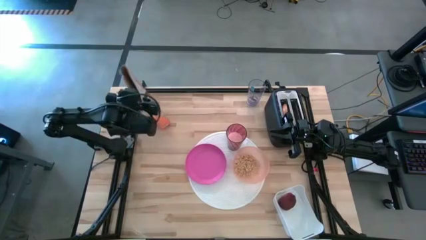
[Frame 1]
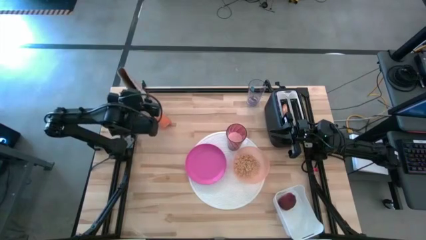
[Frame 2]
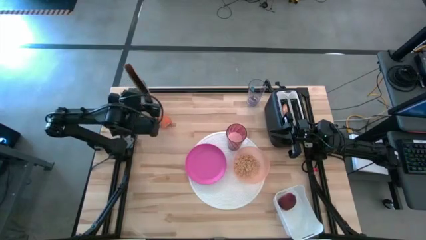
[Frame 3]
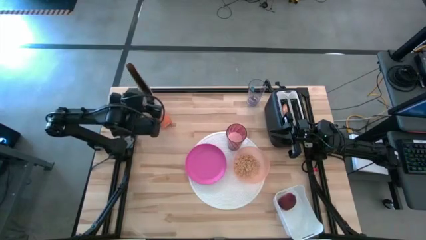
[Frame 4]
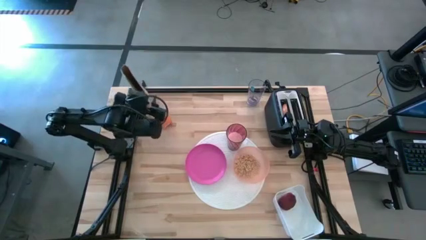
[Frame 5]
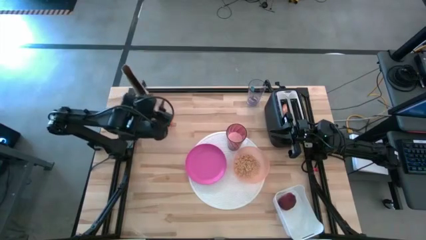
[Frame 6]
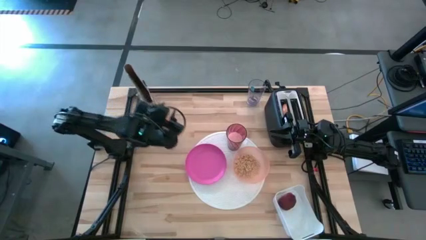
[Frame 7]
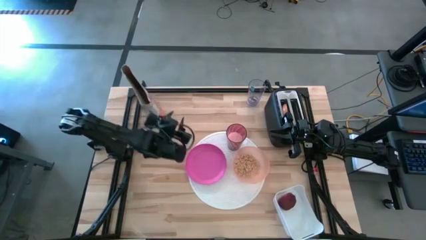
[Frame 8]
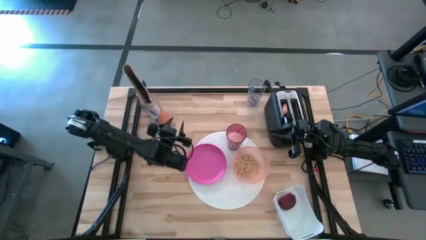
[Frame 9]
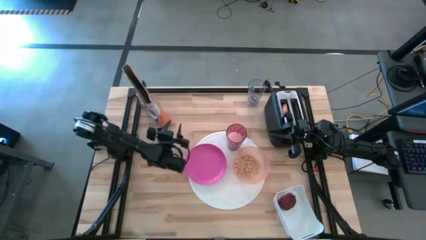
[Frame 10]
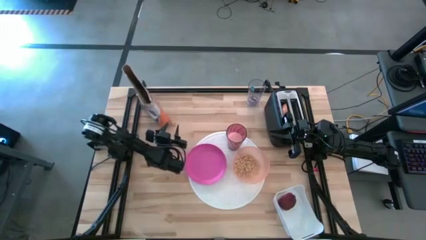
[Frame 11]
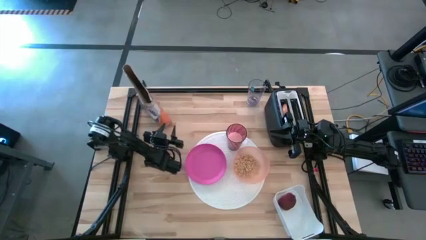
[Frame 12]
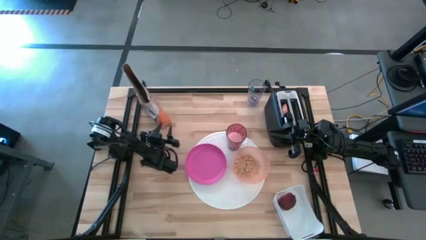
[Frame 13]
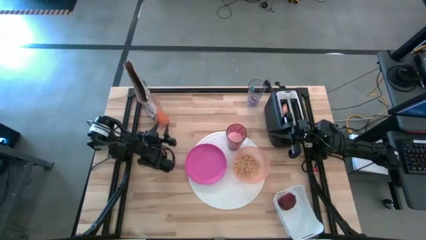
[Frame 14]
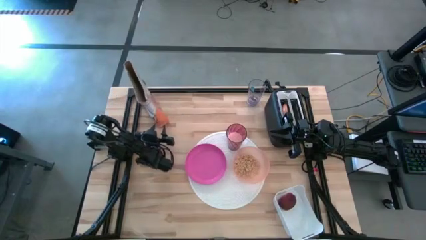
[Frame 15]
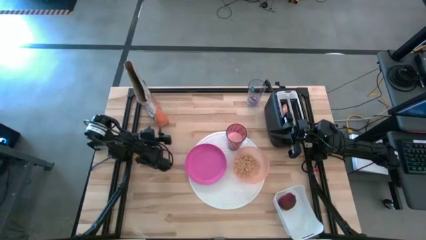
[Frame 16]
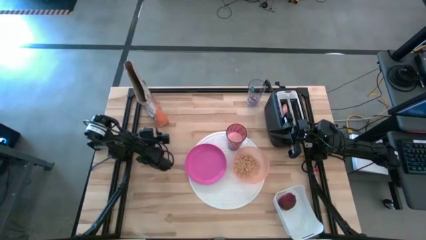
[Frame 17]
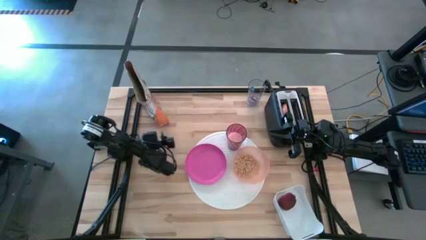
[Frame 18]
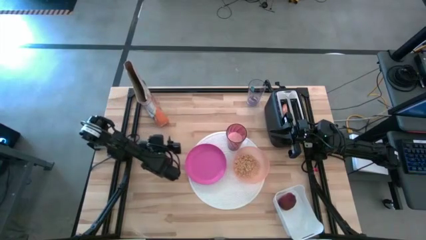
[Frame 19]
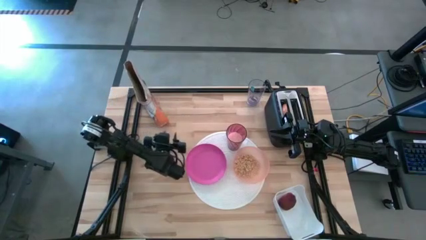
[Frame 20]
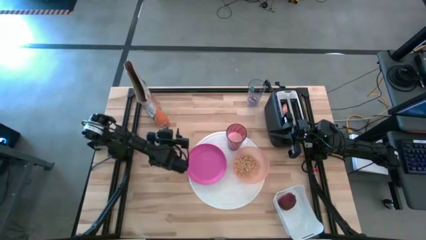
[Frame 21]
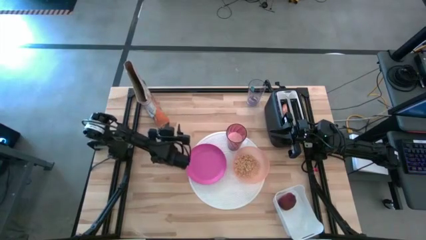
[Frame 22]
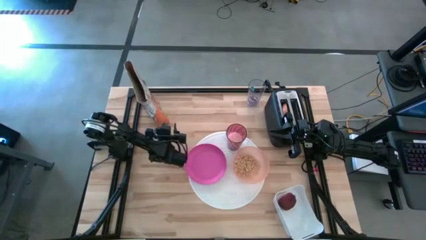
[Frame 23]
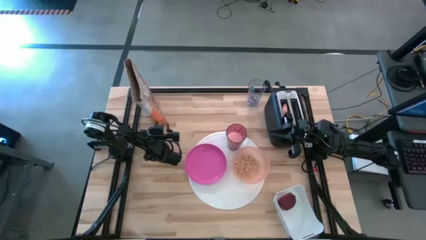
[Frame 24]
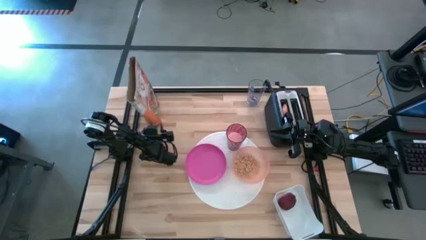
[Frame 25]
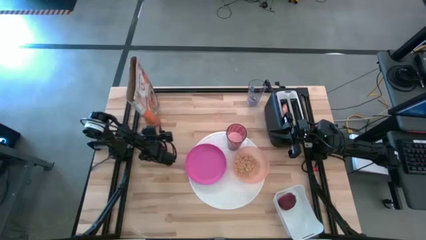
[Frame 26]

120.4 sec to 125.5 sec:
Task: Arrange a breakfast setting
Adjust the cereal box

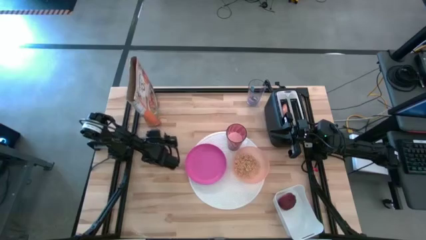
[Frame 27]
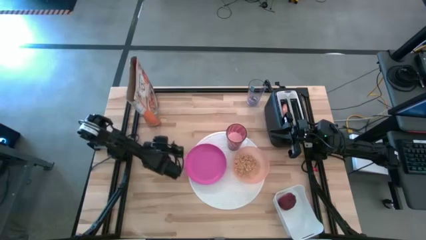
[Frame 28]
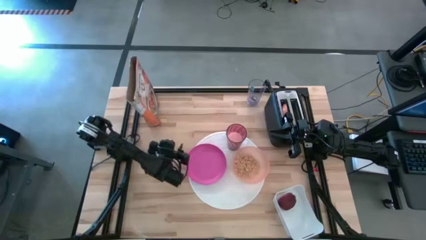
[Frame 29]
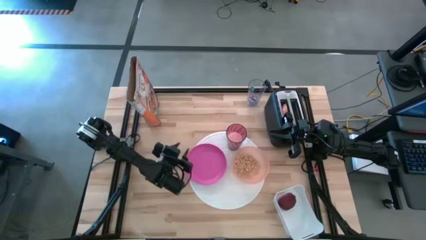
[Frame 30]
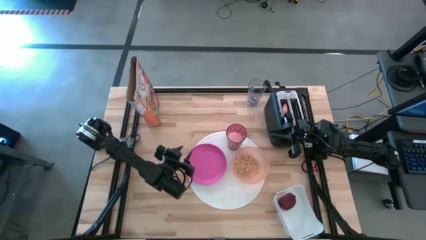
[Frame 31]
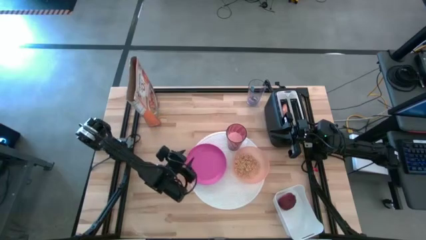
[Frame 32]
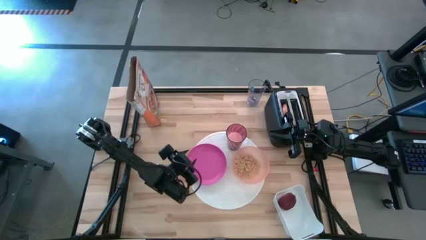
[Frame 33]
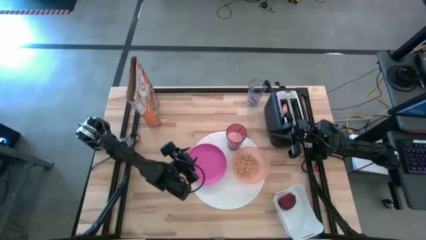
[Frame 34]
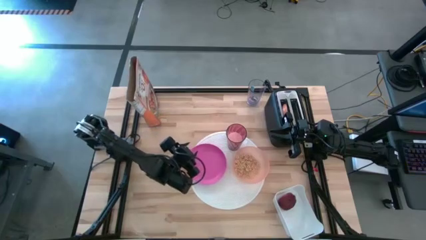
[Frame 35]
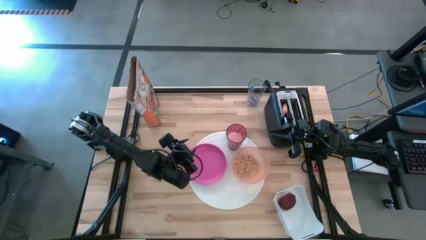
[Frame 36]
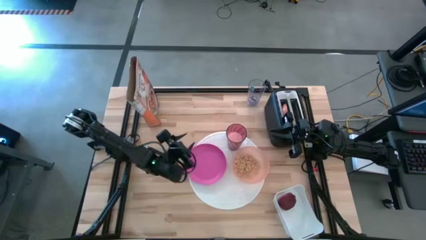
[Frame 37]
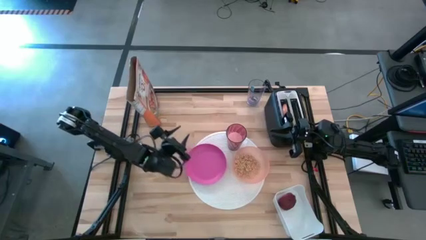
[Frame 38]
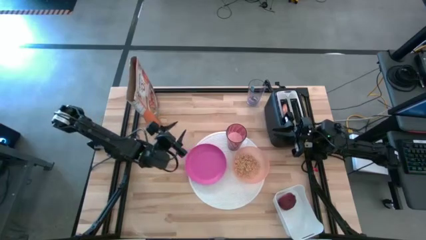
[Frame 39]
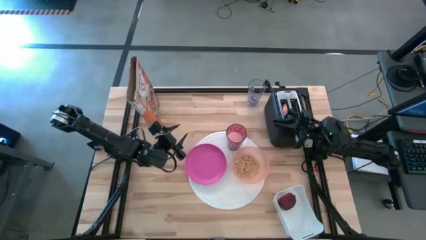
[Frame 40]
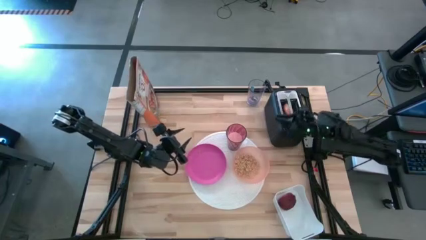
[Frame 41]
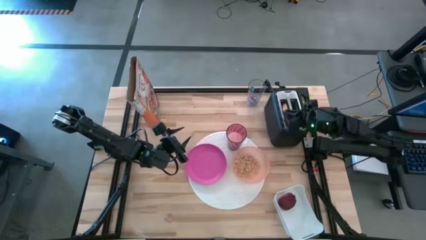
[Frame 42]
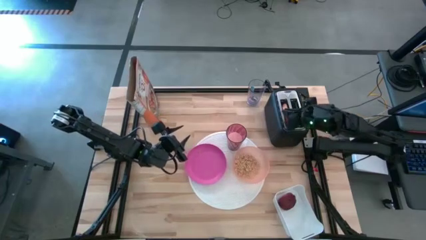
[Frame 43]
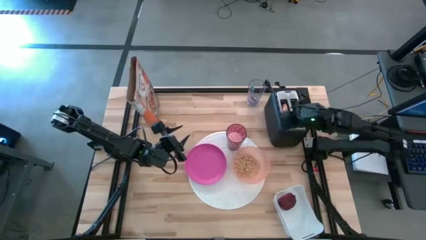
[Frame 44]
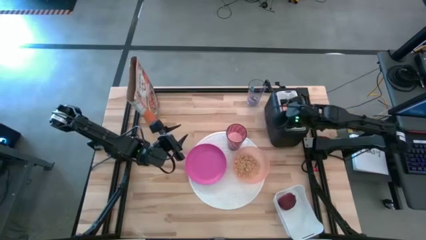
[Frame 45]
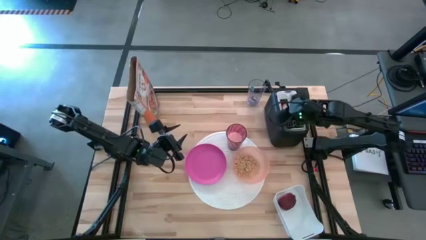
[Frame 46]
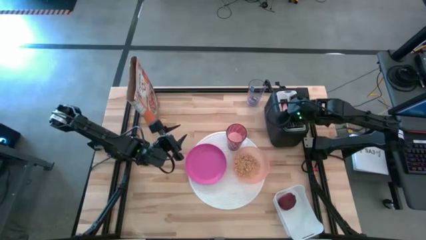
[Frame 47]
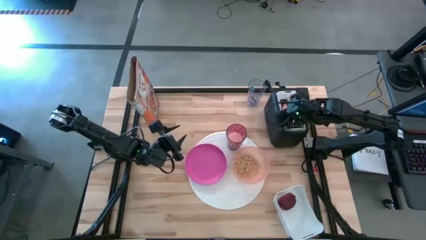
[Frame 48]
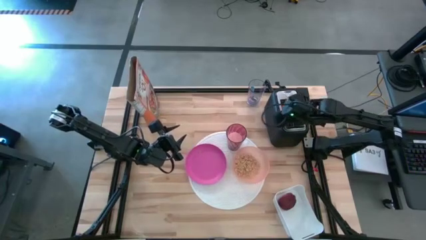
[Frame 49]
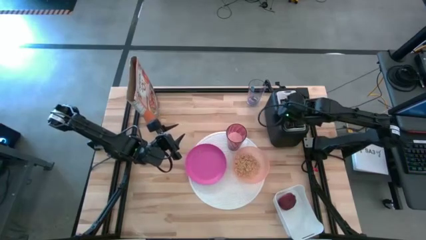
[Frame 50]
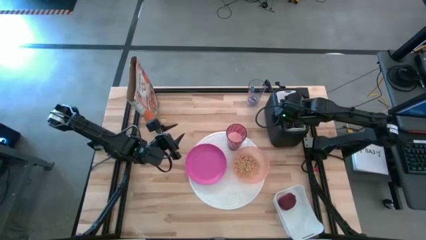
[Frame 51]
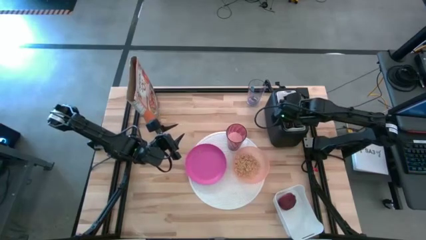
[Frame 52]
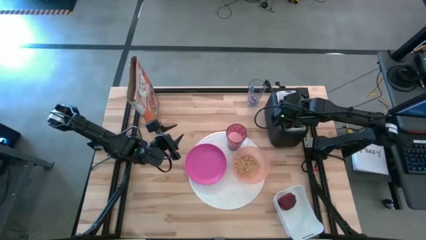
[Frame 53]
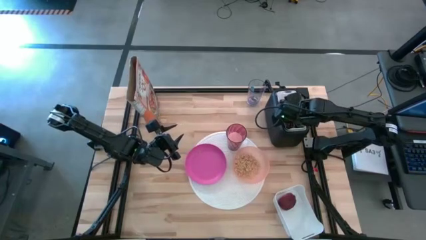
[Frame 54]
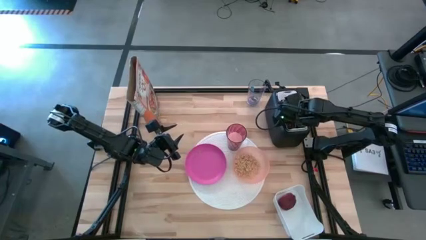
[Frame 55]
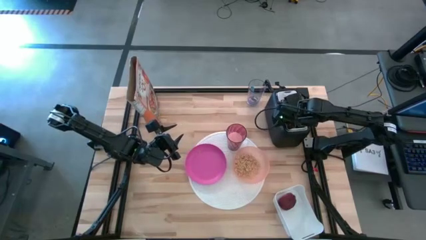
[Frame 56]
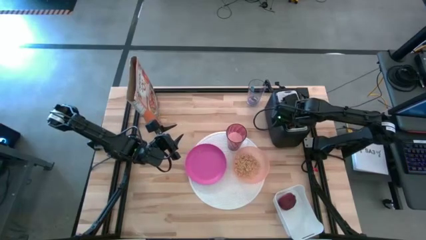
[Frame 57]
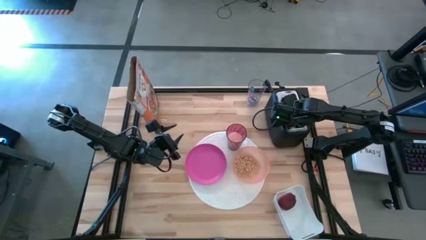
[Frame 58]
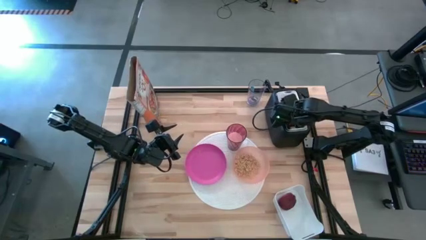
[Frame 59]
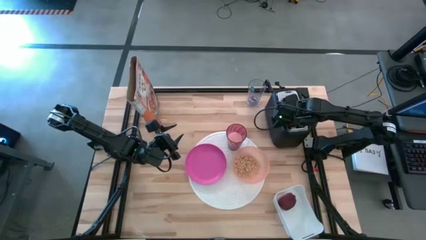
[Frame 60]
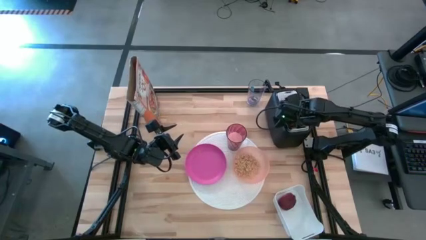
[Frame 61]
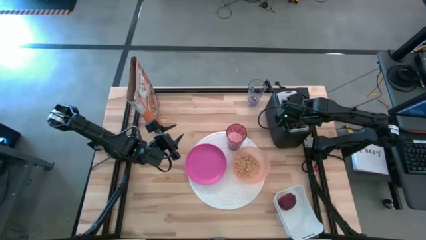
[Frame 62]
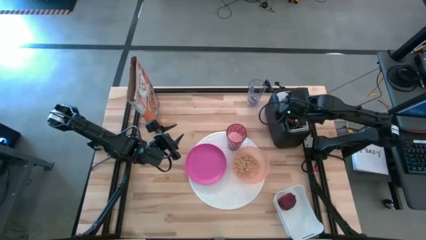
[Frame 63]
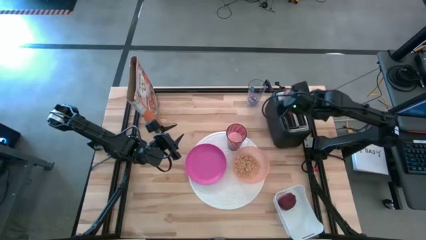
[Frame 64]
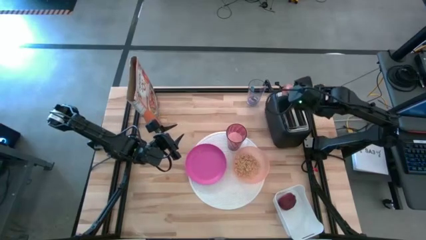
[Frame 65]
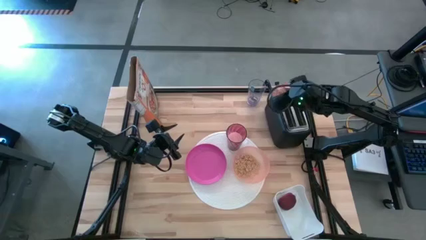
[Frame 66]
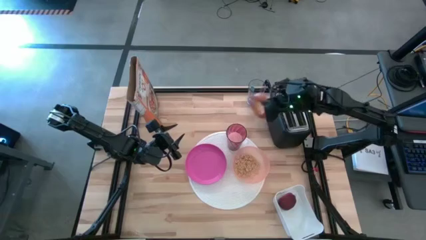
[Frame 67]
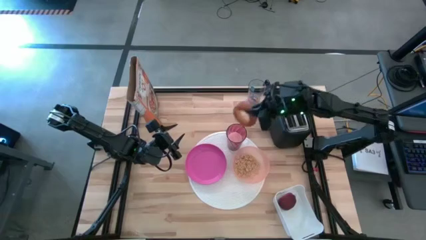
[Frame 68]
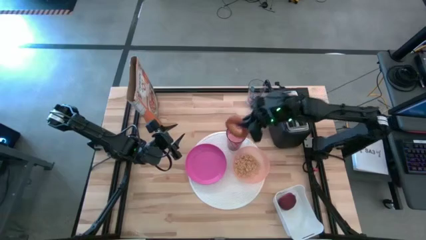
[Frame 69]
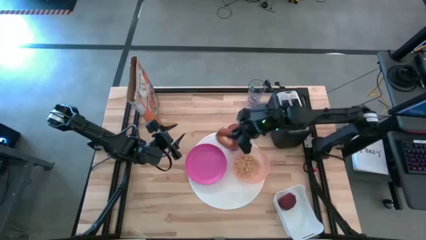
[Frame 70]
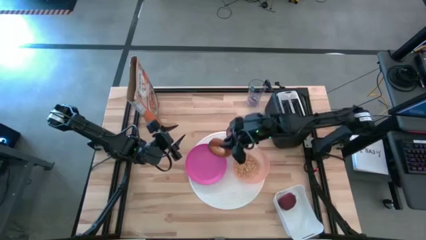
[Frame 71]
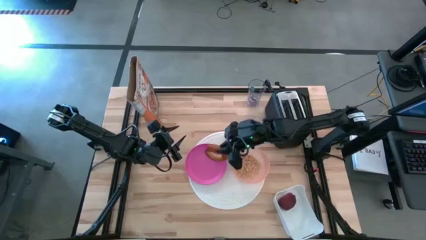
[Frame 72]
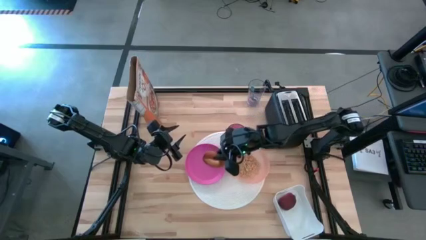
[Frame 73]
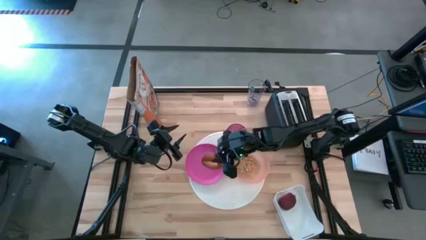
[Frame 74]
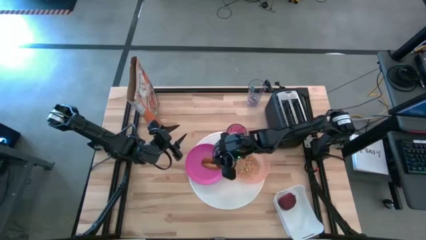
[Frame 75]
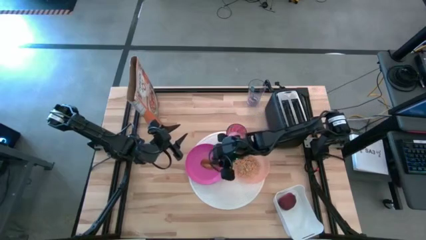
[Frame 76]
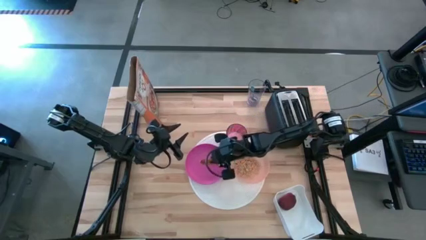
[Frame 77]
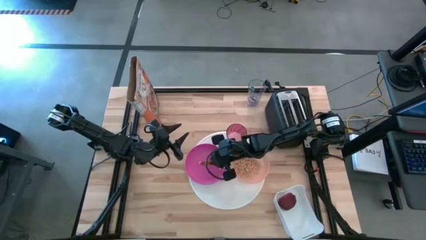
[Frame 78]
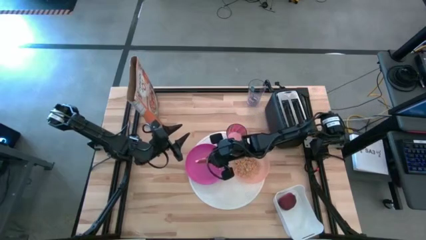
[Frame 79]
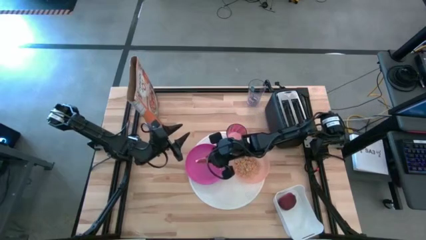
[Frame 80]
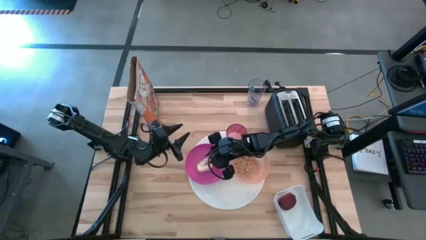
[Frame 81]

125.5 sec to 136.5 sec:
Put the toasted bread on the pink plate
